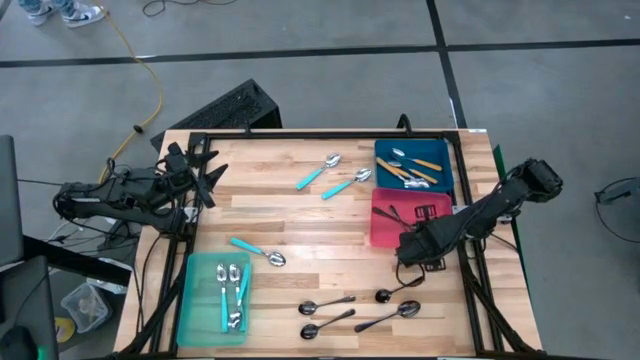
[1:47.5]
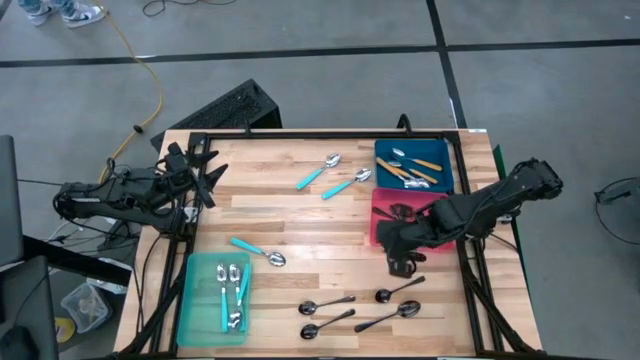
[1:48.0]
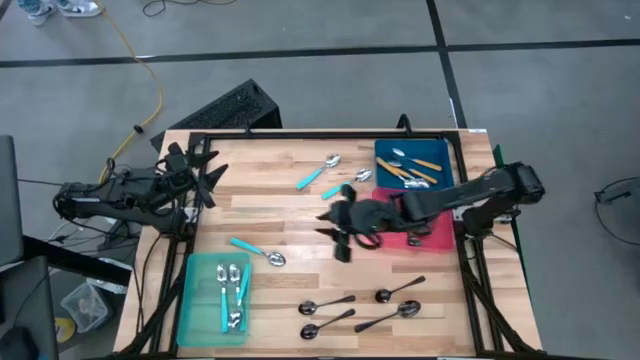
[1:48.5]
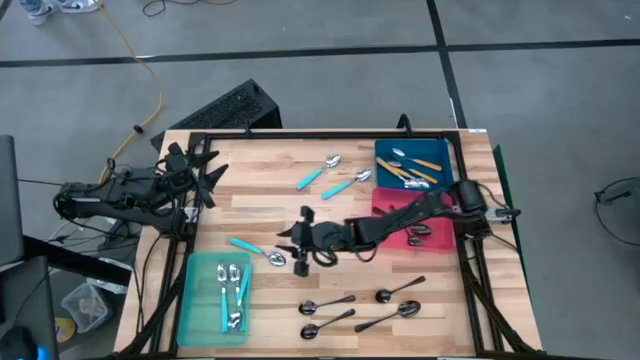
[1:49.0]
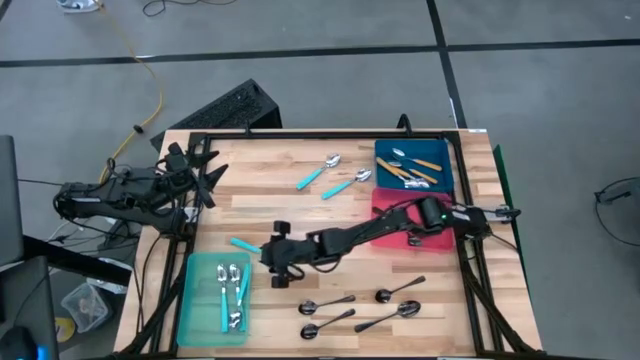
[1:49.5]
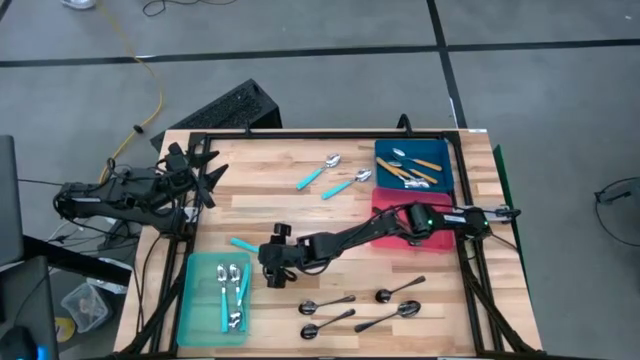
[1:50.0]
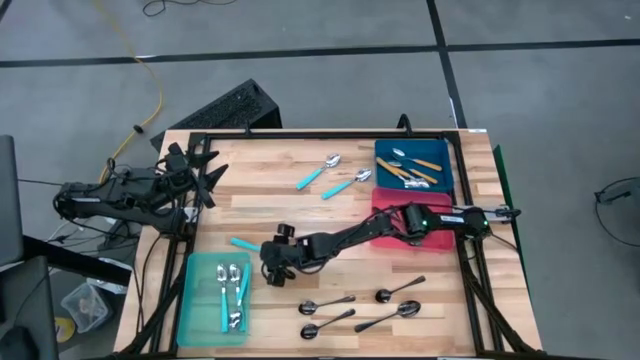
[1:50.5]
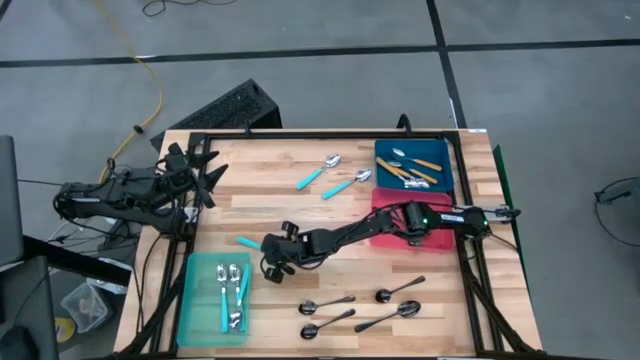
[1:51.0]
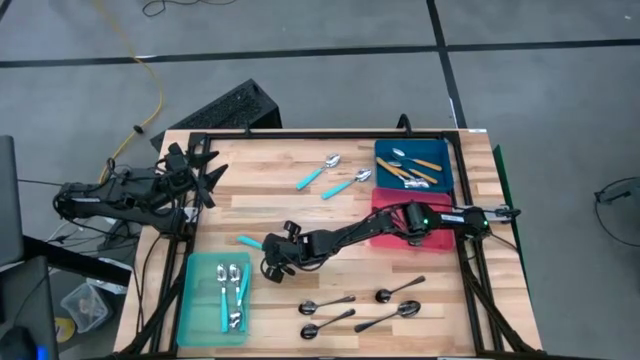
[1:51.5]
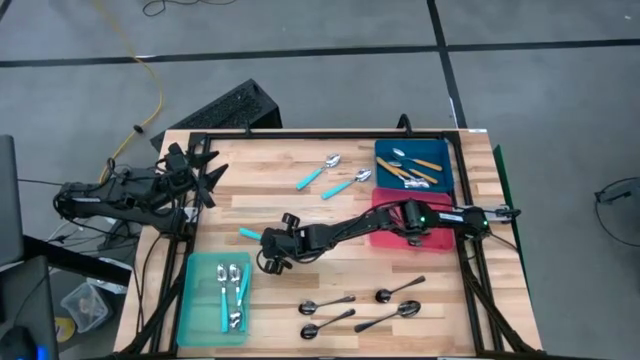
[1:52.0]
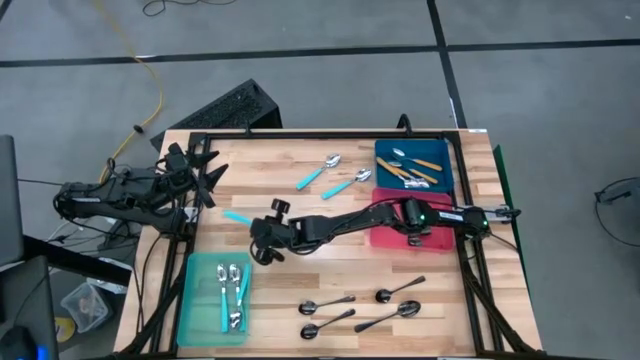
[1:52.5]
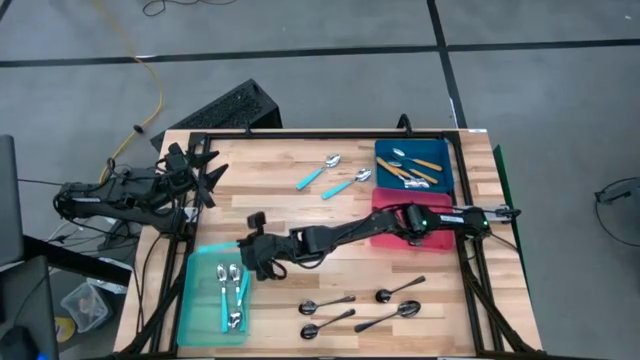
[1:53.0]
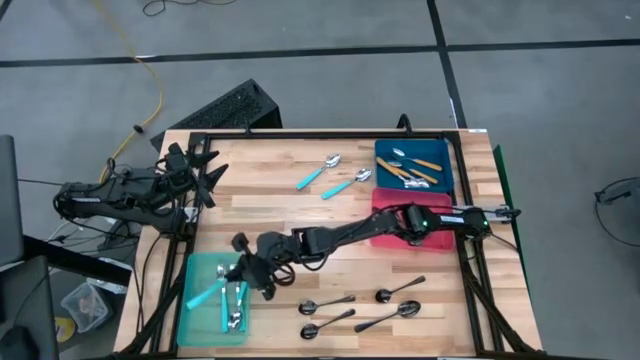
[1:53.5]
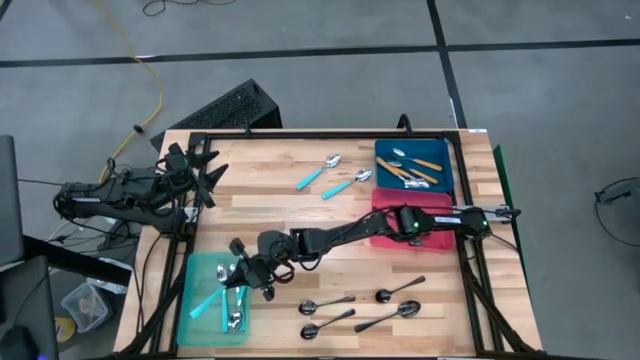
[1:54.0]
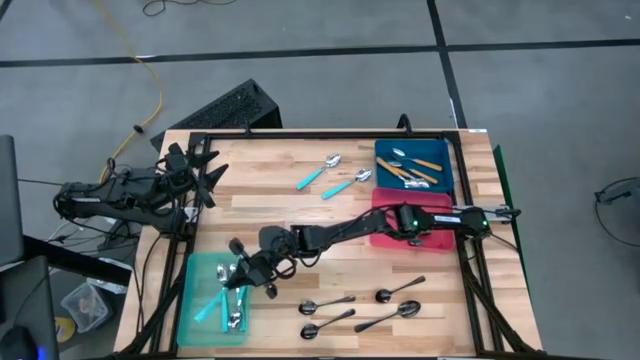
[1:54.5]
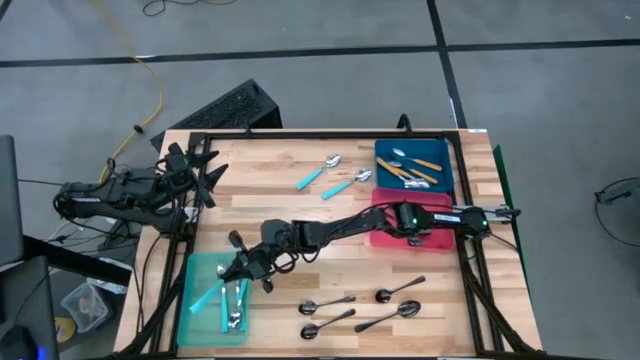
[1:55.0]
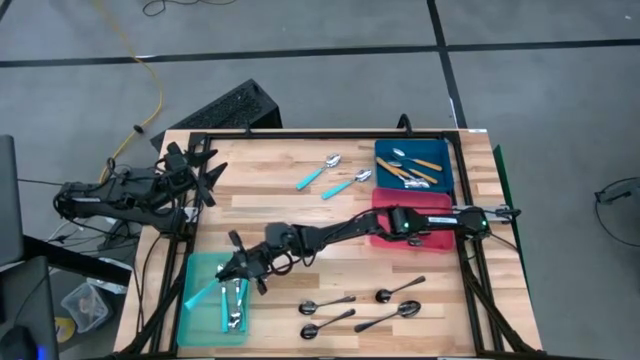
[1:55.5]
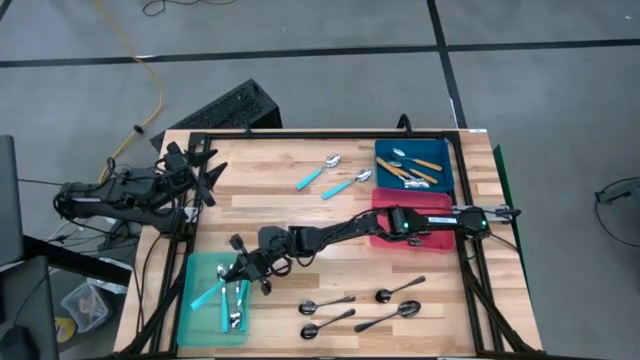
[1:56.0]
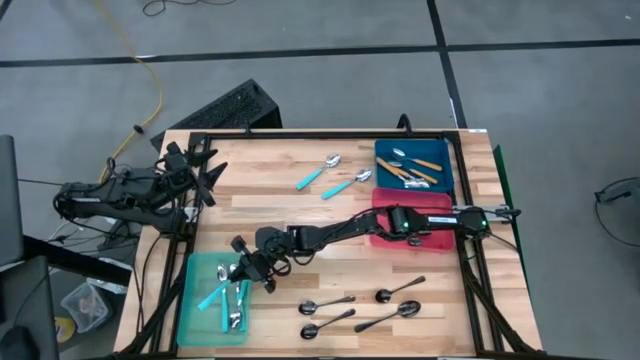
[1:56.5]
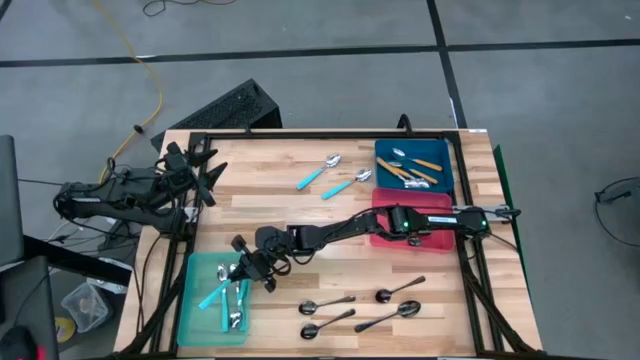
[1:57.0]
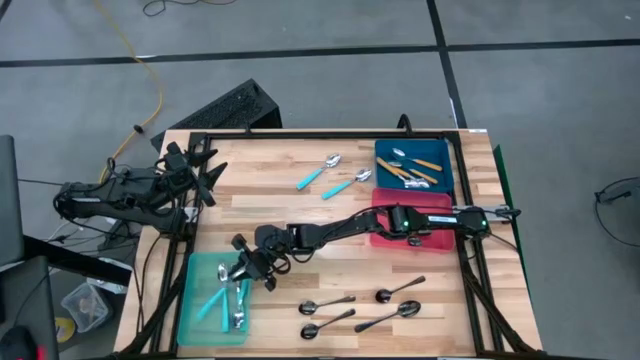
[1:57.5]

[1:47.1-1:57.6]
Task: Sort silverware by color (type)
Put the blue spoon into the skyblue bin

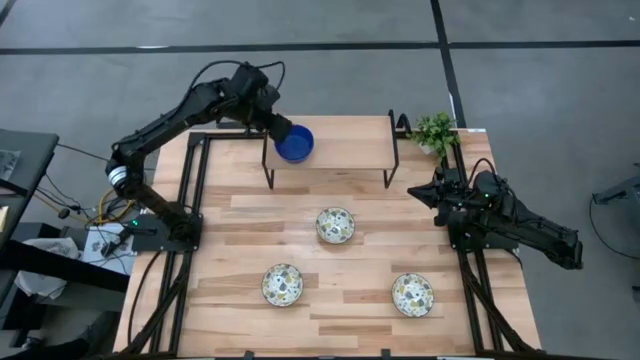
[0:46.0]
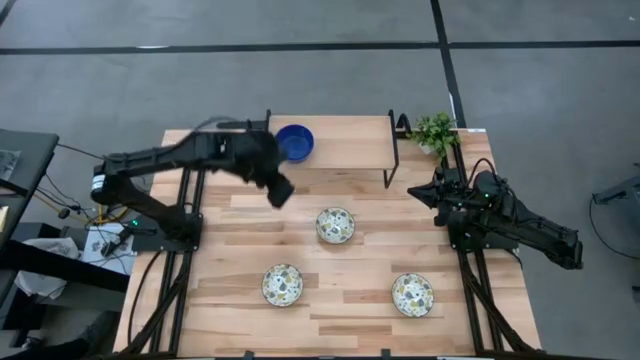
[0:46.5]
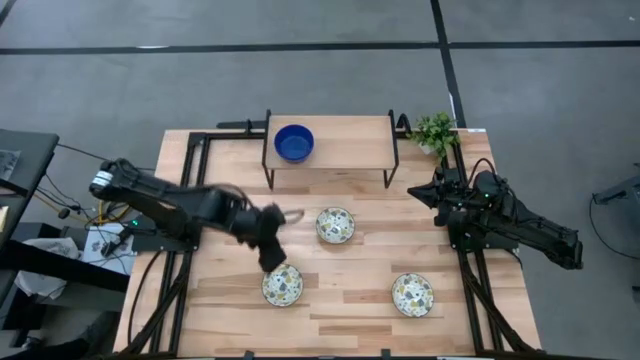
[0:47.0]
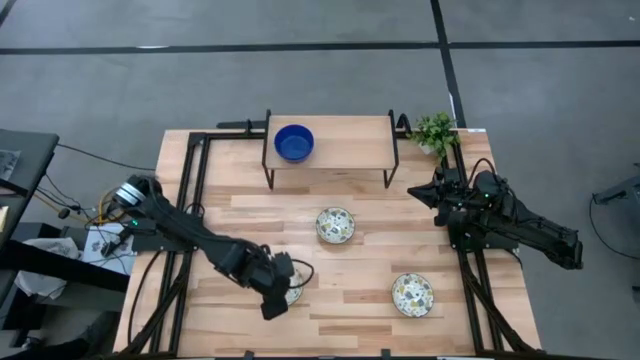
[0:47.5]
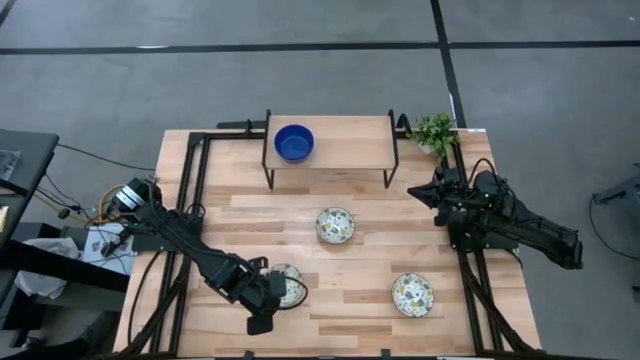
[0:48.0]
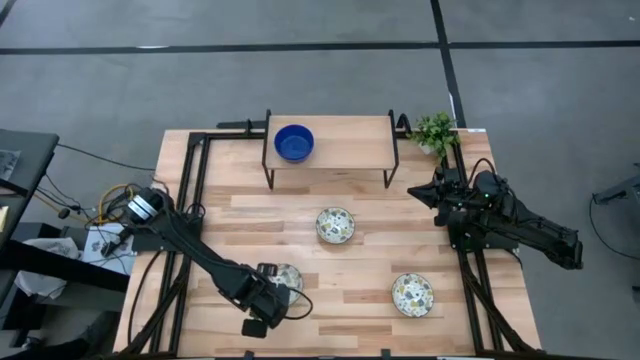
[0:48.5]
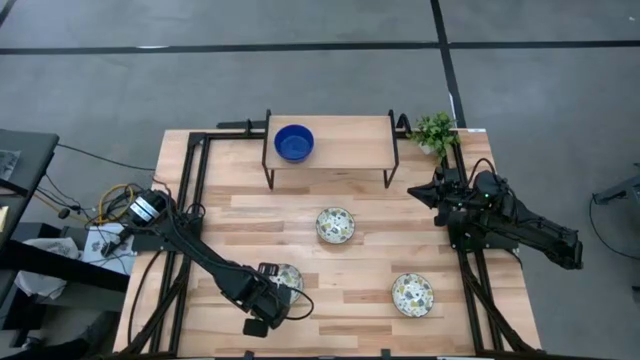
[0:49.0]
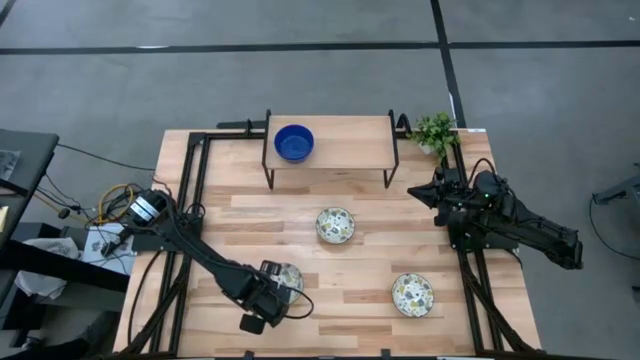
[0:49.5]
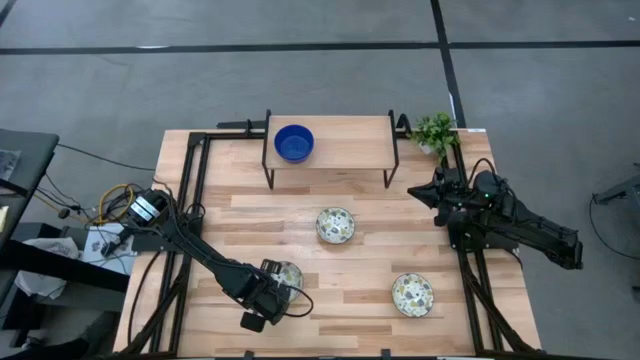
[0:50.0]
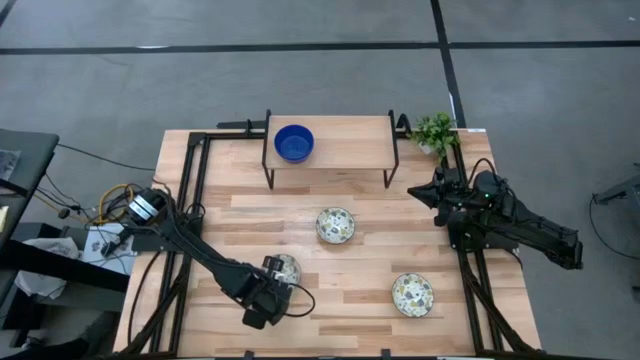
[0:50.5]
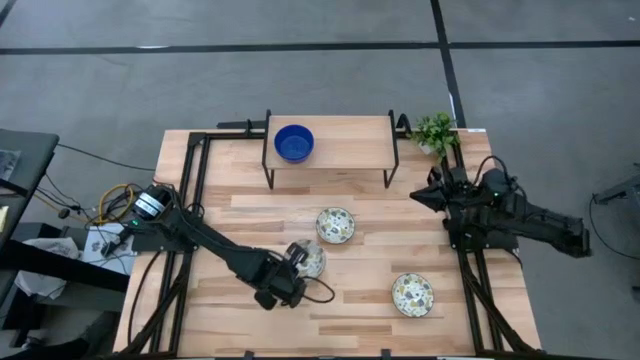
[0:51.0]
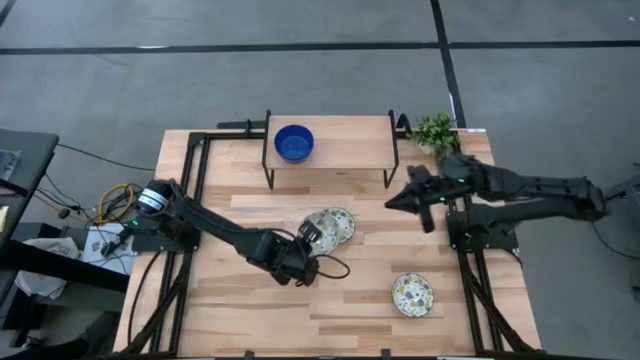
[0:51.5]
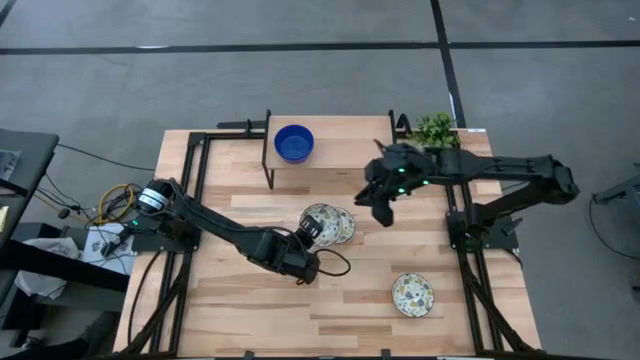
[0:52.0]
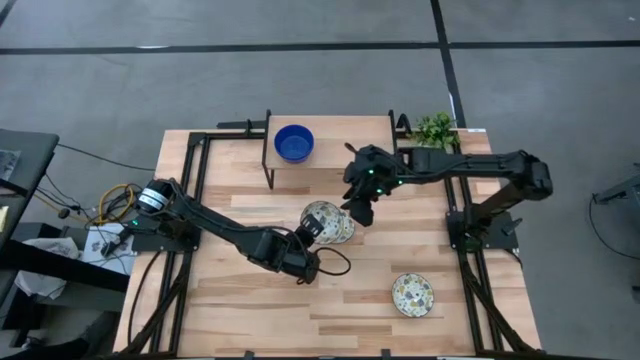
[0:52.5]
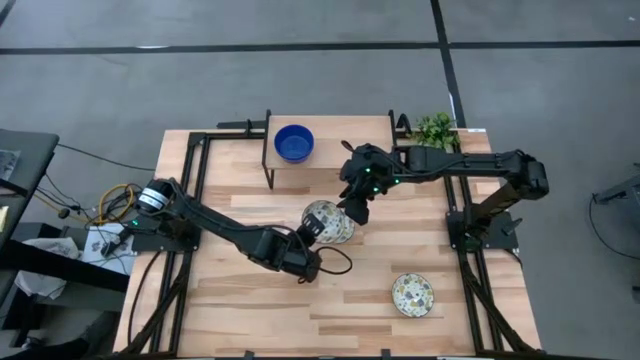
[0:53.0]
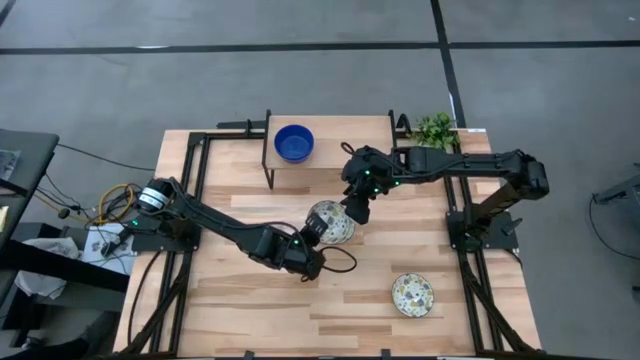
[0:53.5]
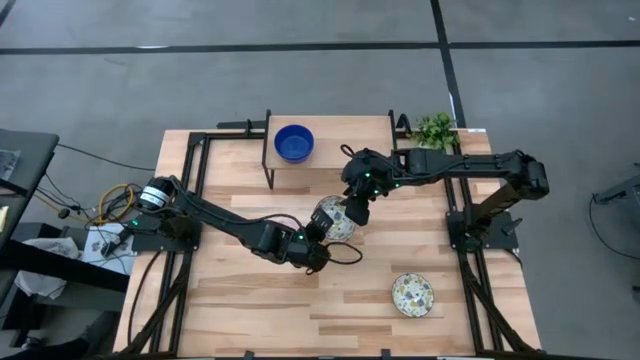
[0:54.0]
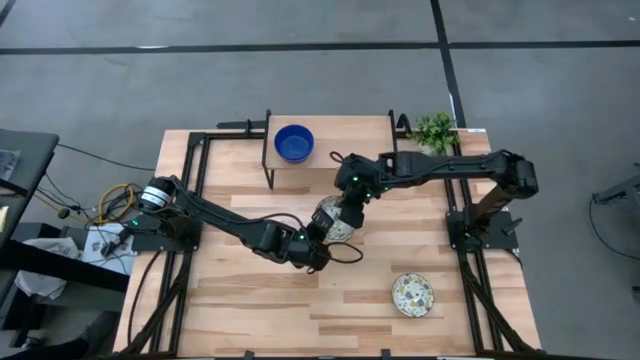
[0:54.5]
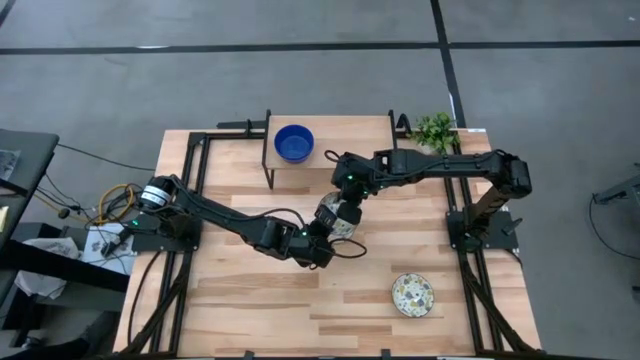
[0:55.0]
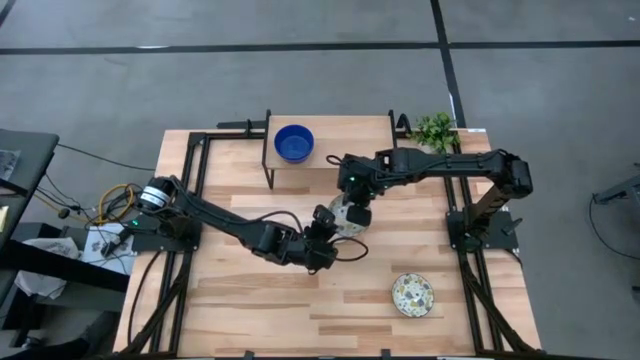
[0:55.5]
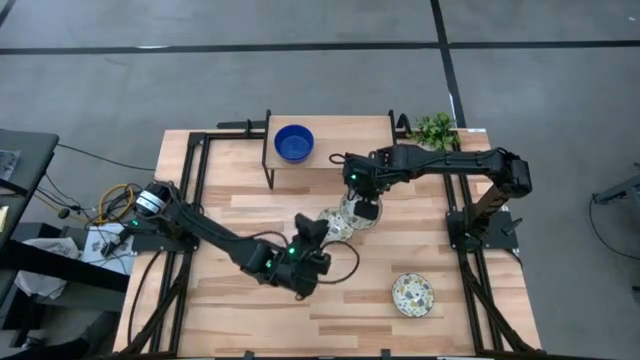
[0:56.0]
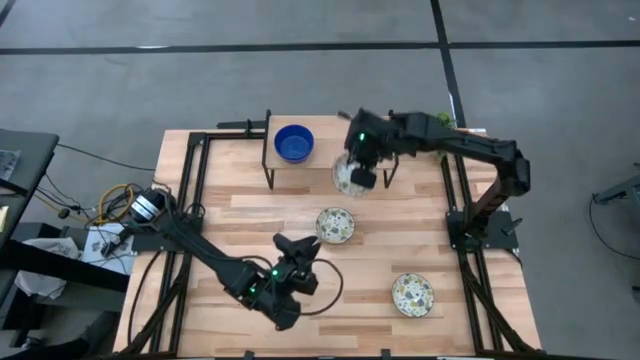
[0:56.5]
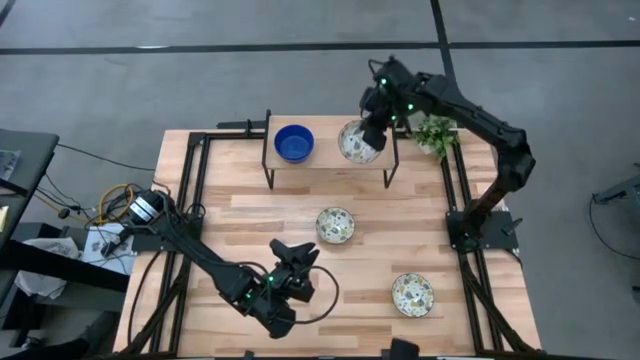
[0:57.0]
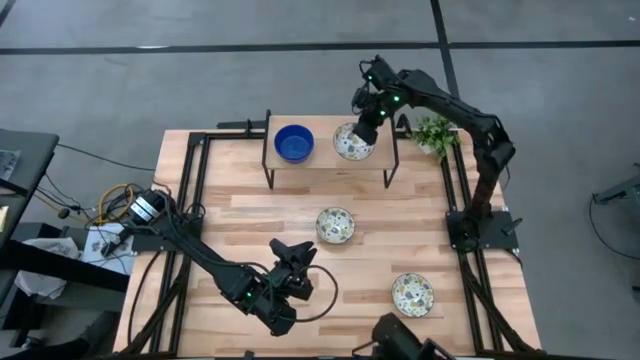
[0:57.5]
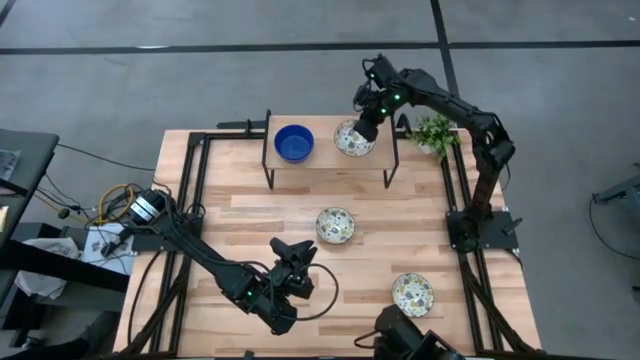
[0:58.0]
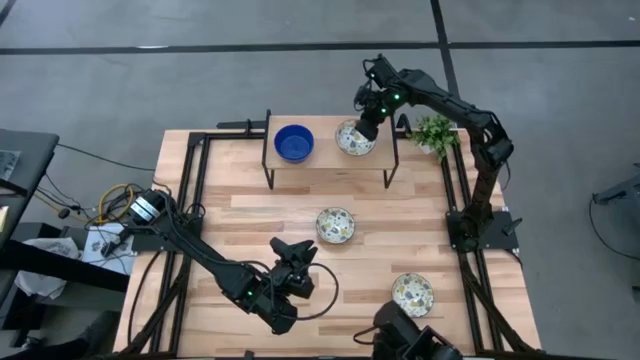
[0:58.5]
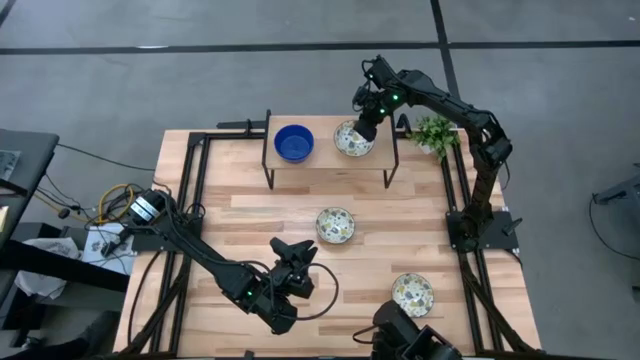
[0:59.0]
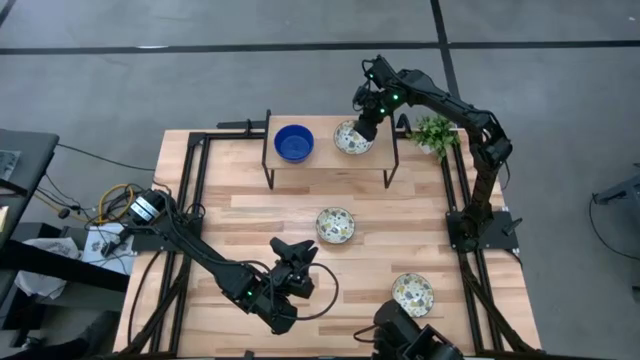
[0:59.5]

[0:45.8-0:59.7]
Task: Pick & Place Mini bowls
Put the bottom left yellow patterned bowl on the shelf
